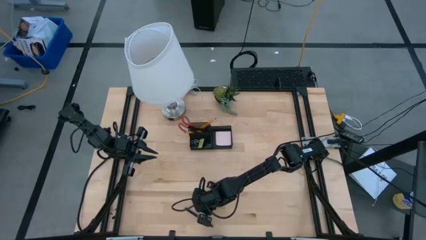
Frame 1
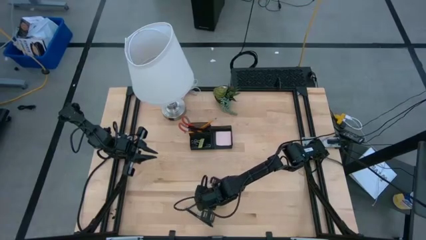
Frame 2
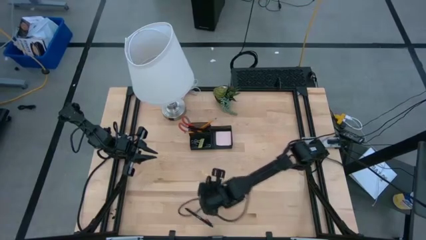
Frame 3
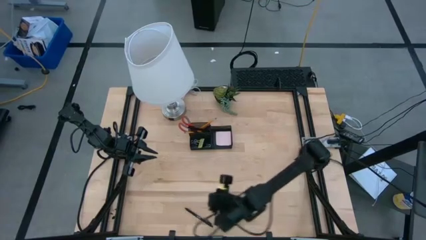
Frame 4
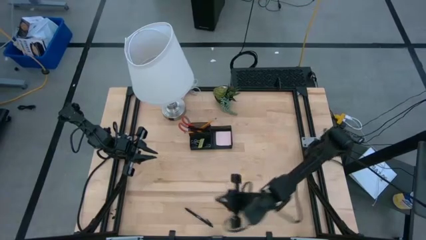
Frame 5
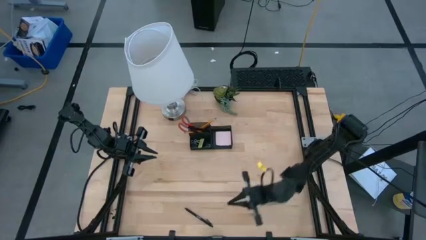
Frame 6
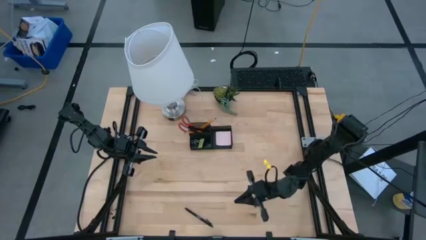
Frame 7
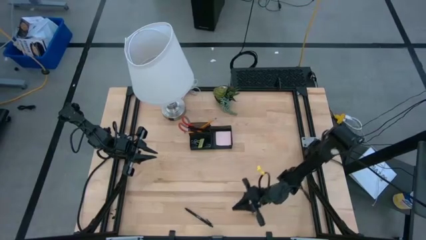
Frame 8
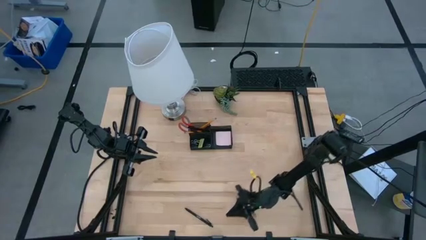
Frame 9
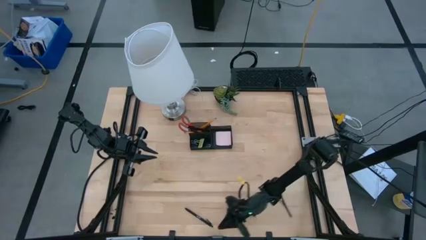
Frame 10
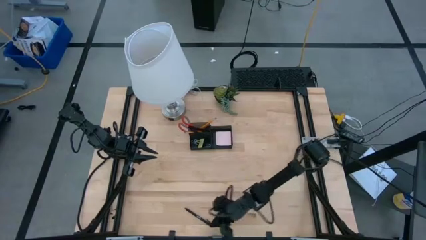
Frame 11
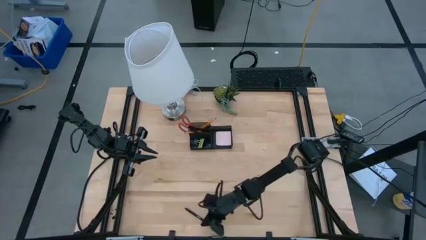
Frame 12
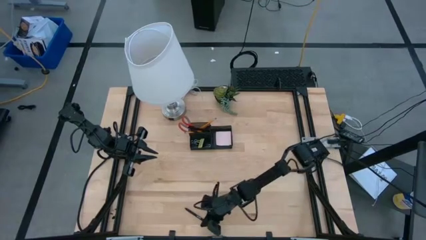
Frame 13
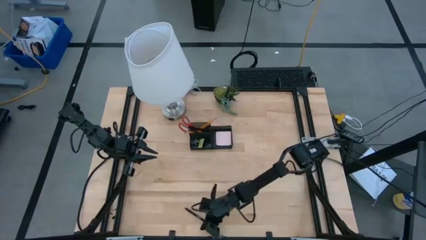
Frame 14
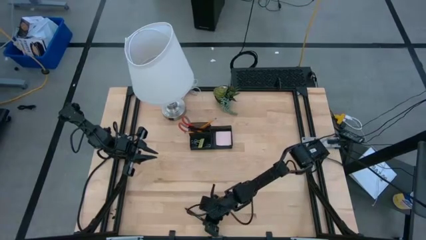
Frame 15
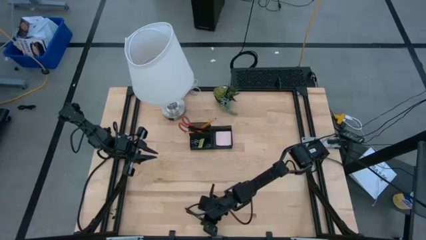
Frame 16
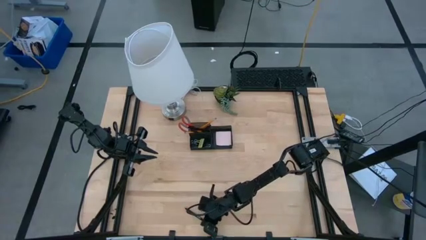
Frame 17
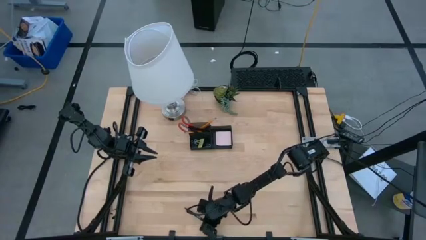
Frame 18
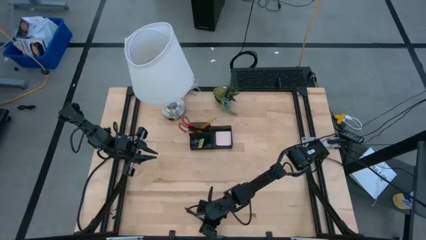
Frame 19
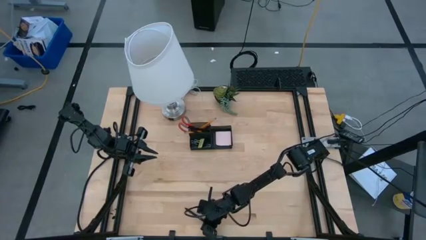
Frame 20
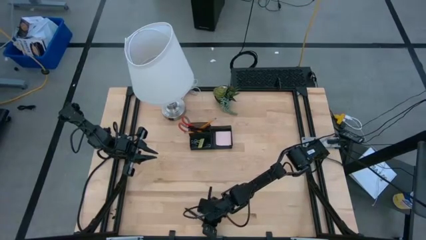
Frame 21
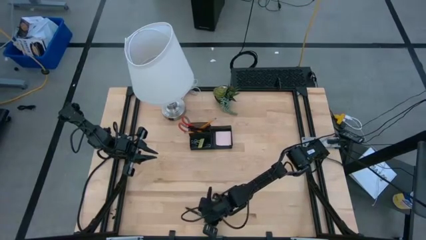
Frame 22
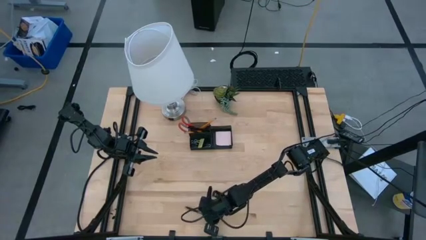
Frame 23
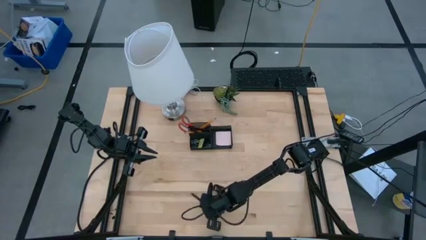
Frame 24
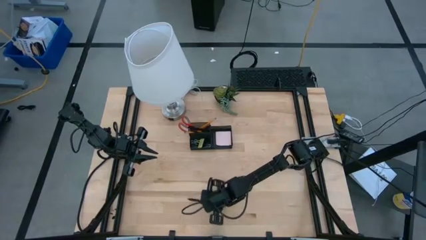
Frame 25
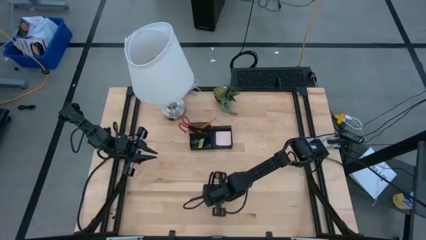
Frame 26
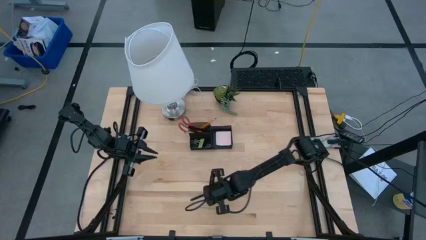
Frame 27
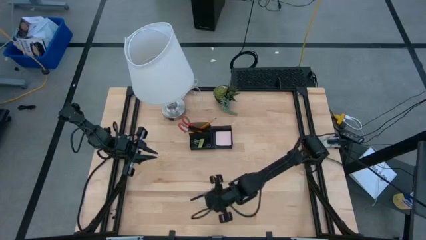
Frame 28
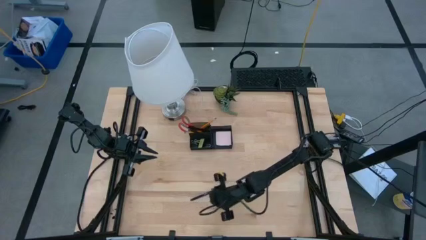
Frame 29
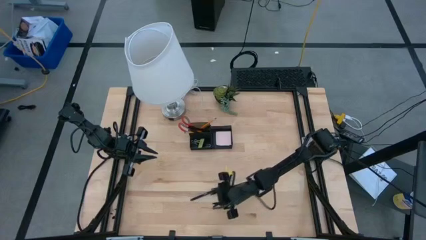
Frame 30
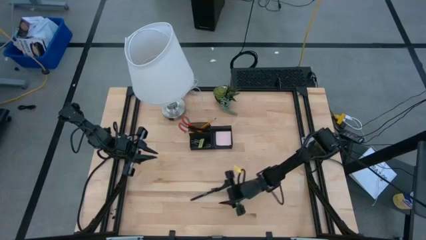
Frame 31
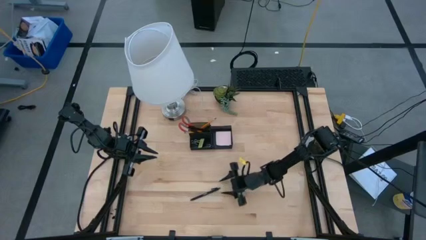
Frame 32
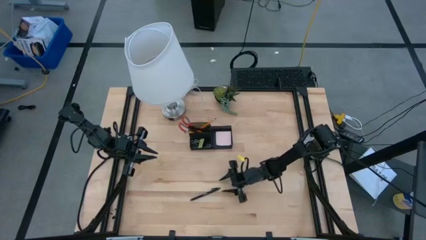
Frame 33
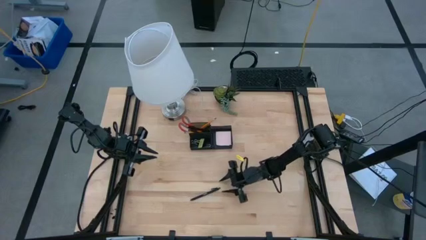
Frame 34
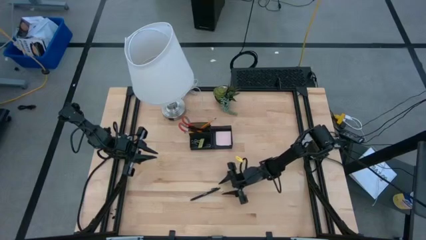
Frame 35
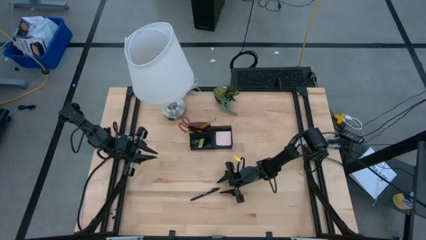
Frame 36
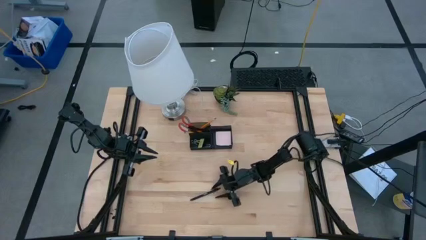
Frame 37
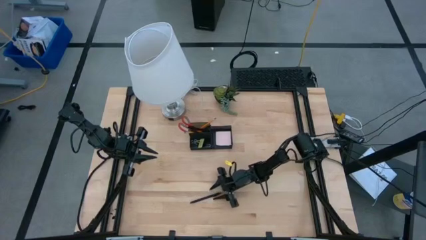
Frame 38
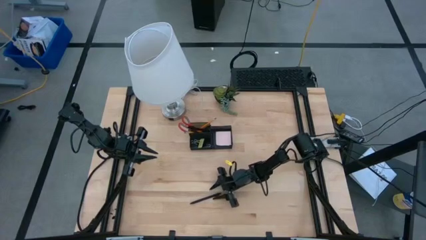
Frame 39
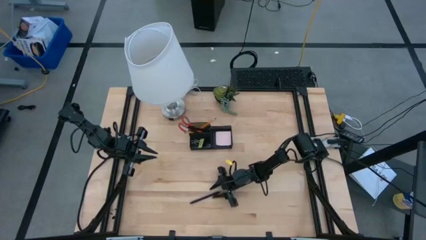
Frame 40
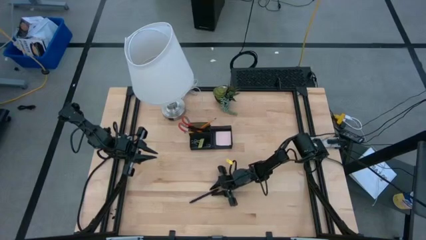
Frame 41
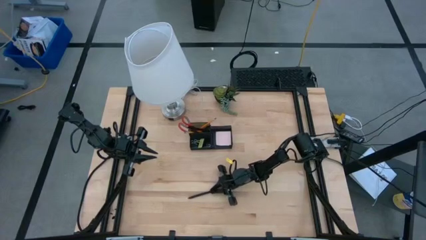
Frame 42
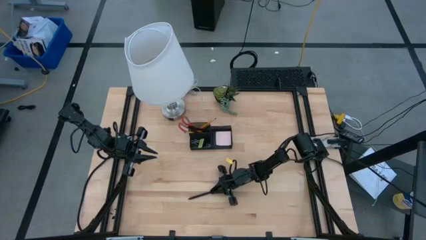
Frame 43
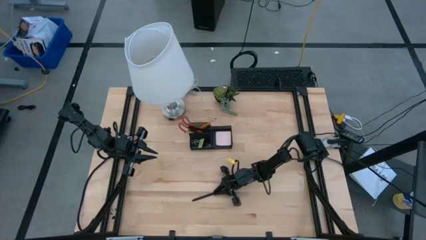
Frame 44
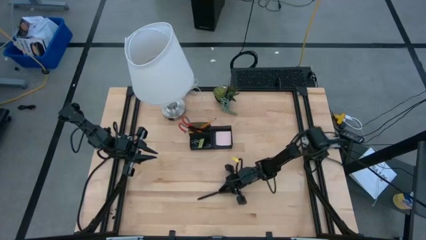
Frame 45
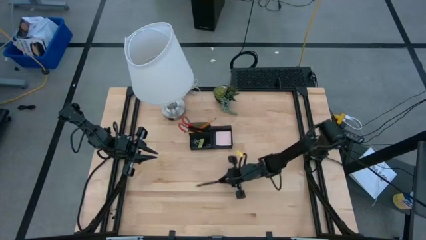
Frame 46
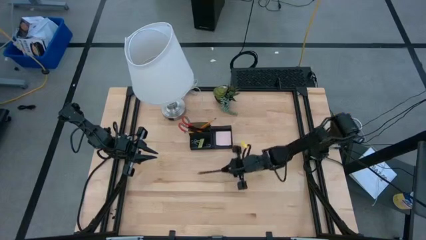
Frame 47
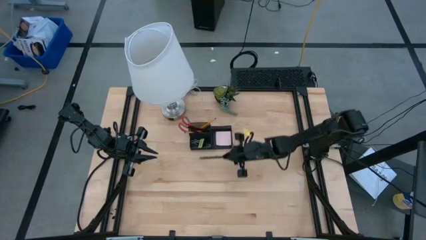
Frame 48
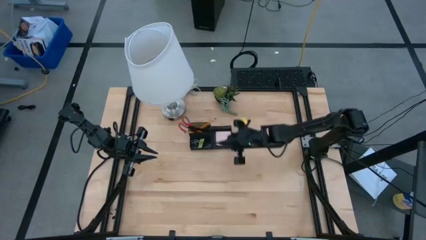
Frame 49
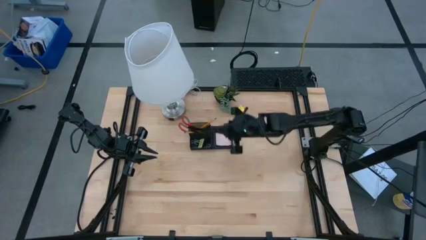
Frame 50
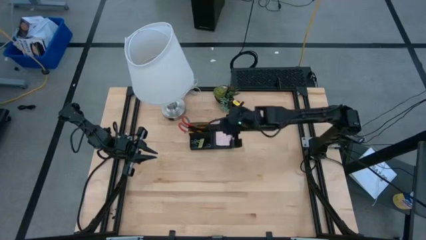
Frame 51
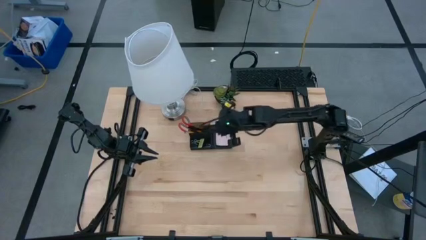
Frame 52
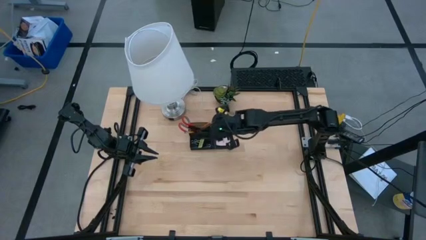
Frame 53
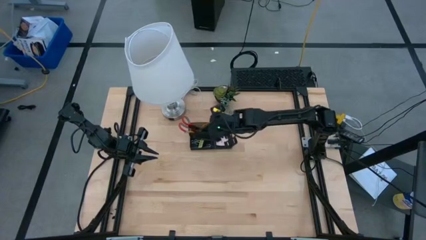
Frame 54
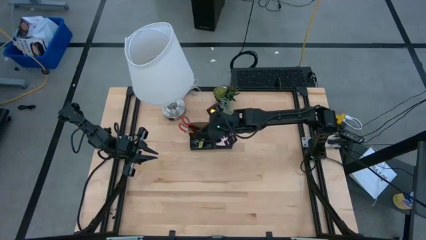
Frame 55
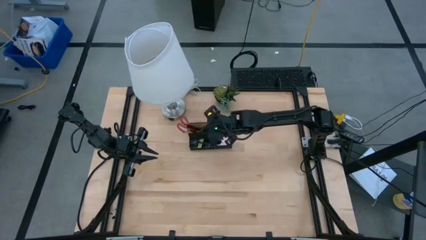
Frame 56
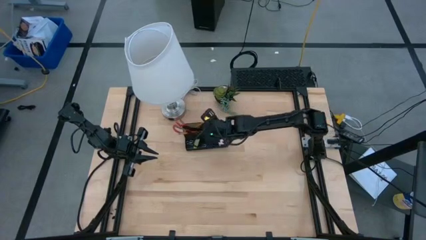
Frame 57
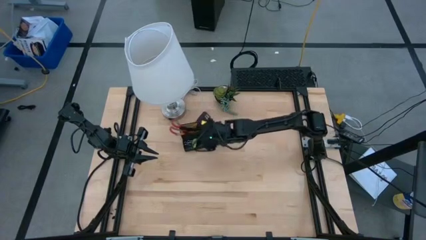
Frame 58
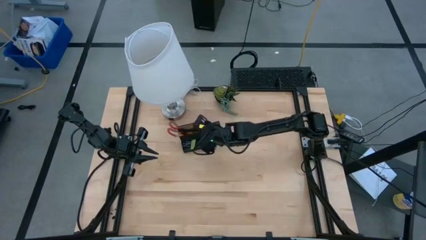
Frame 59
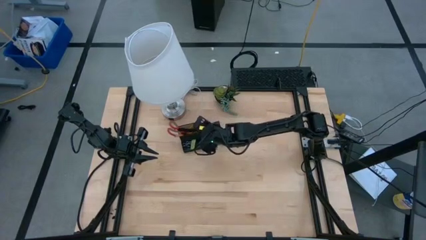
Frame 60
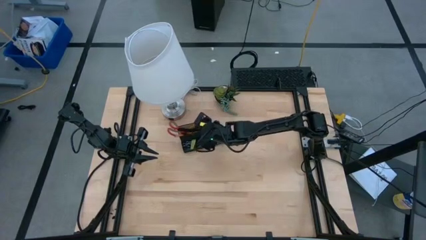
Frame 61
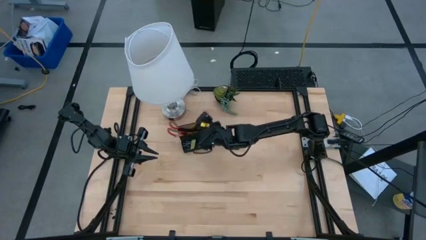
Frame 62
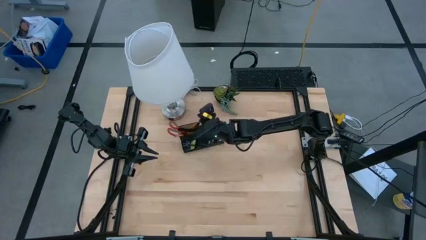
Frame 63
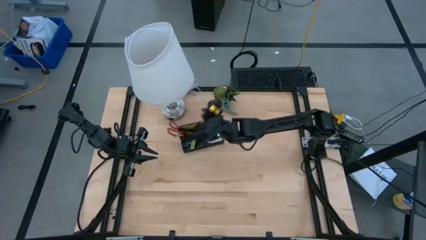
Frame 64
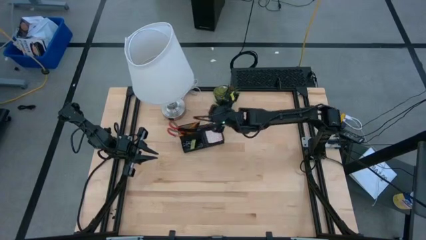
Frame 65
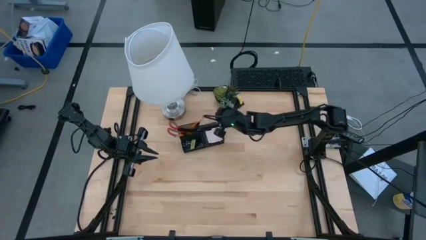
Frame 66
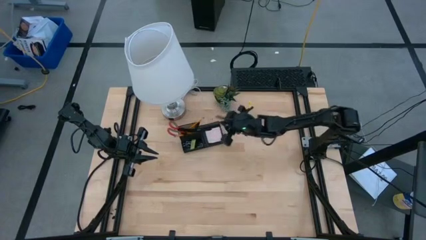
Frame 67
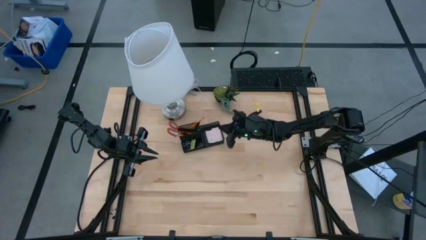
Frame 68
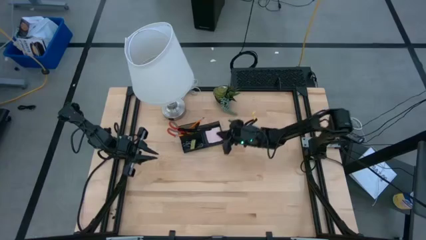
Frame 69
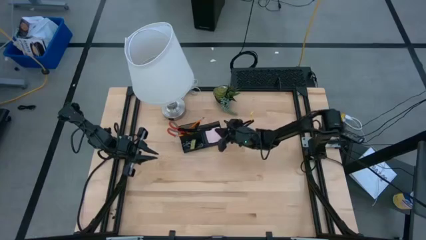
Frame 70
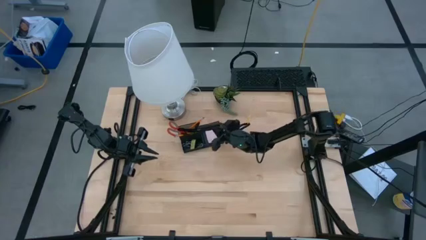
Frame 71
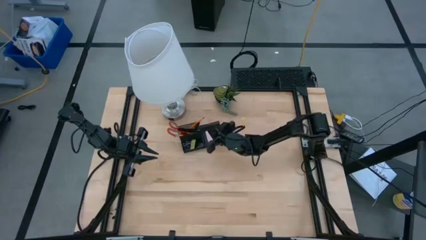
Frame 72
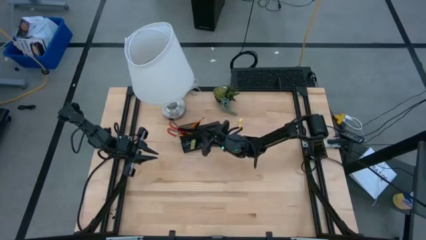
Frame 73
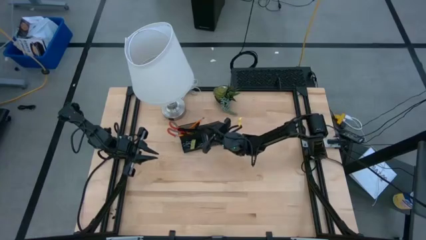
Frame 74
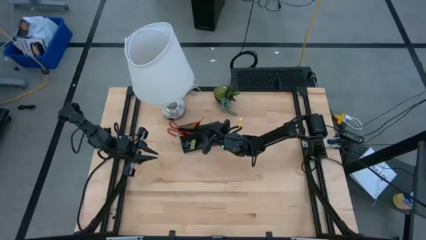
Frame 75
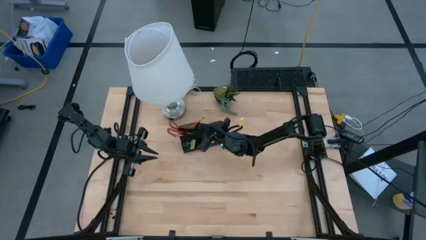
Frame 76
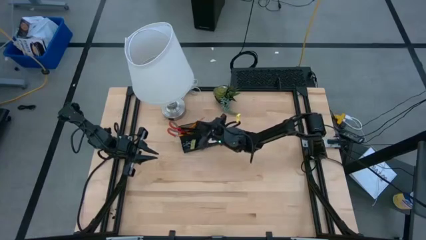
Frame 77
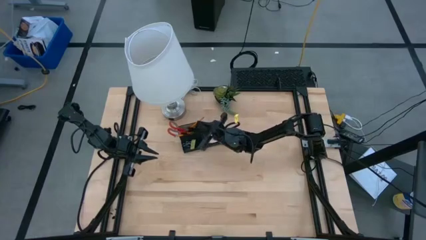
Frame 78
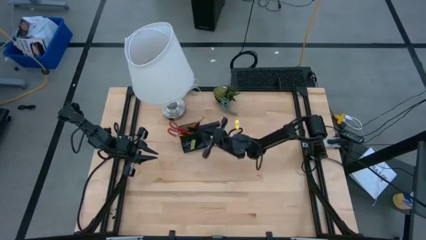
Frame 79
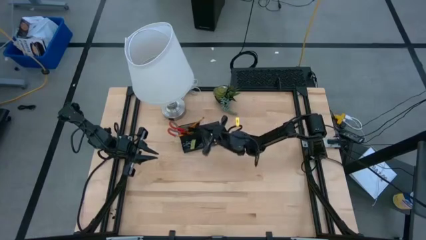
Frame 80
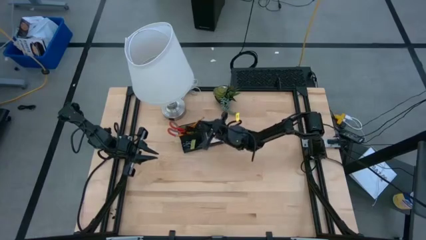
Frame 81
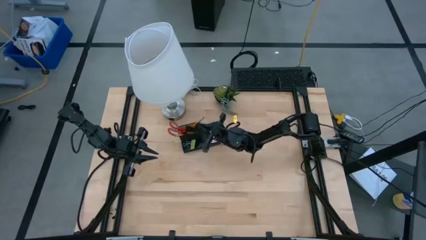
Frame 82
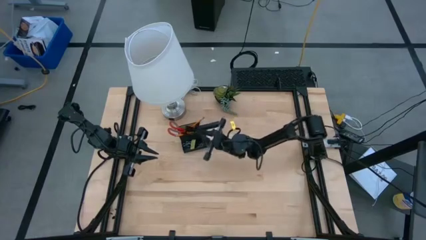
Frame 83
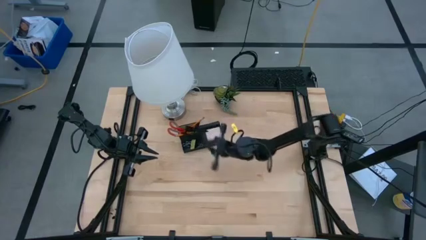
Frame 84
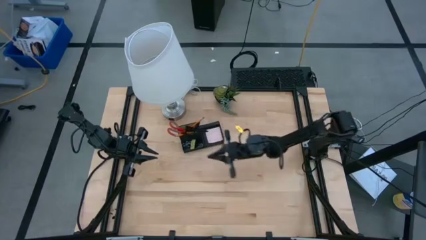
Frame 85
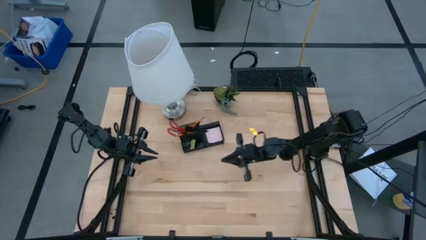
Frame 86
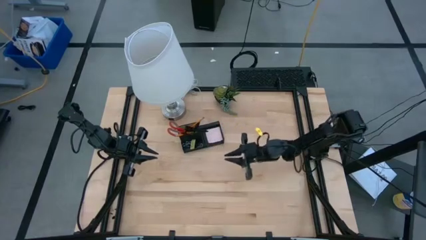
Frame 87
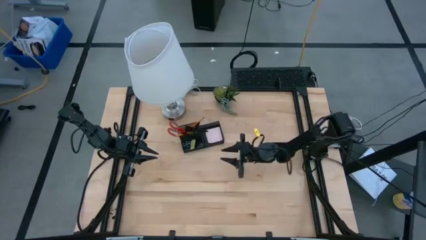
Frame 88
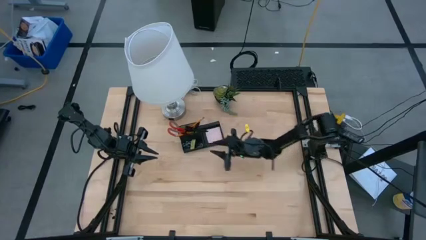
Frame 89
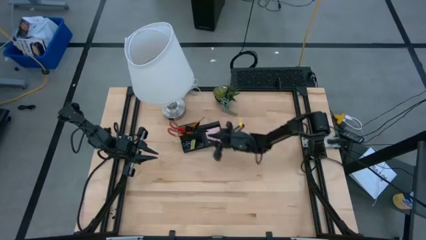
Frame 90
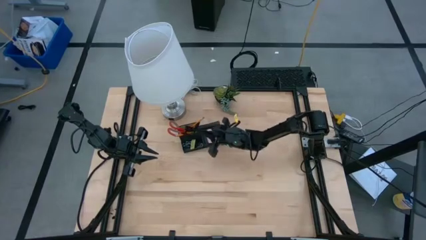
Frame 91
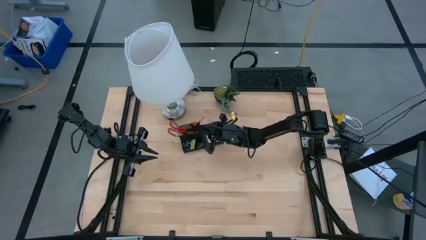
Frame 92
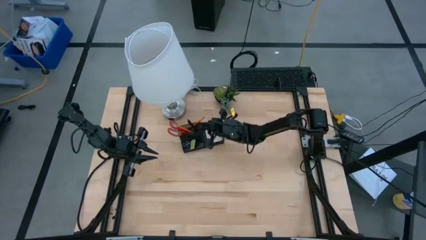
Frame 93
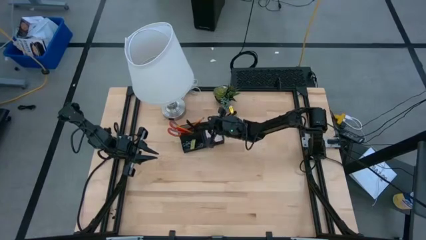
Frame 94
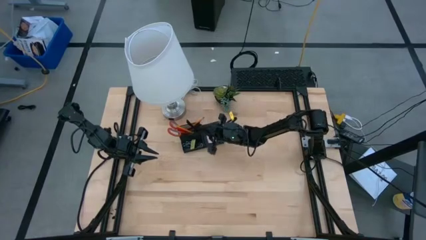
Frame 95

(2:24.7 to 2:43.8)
Task: Pick and place office supplies into organizer
Put the black pen into the black desk organizer
